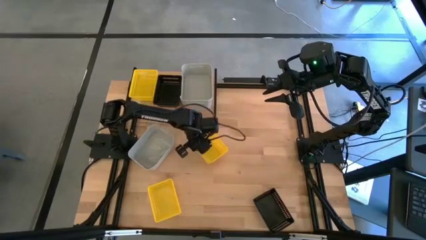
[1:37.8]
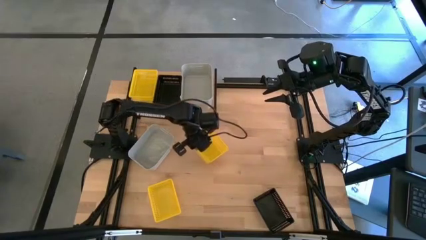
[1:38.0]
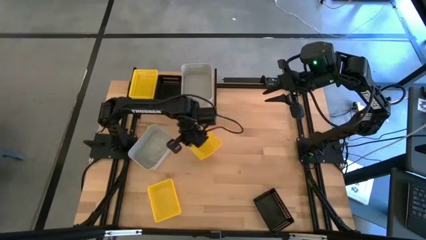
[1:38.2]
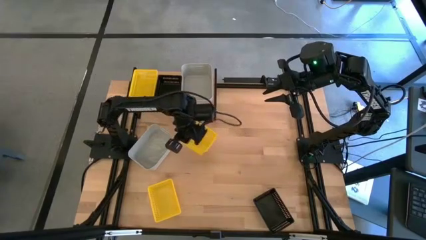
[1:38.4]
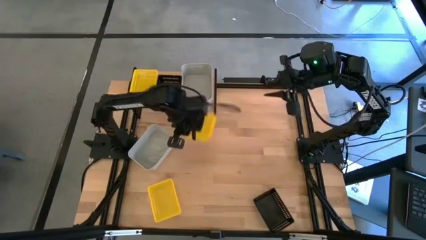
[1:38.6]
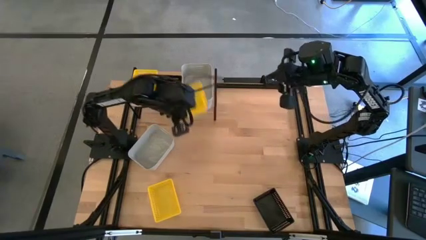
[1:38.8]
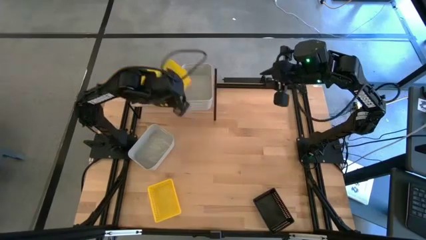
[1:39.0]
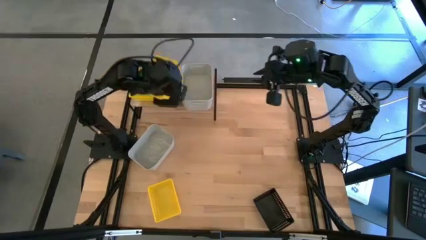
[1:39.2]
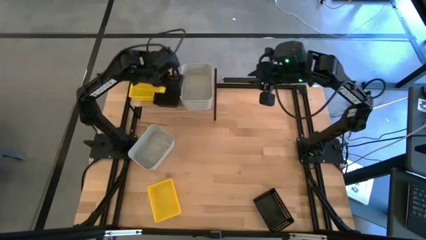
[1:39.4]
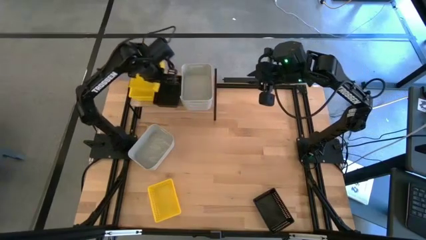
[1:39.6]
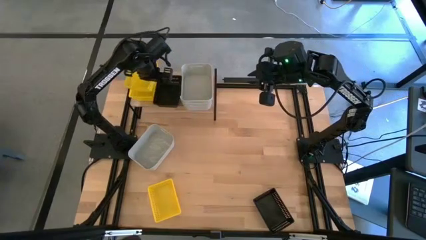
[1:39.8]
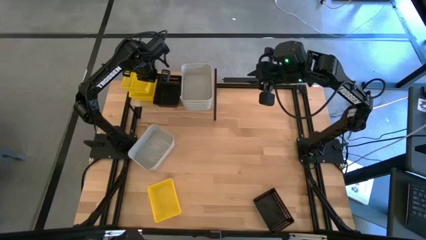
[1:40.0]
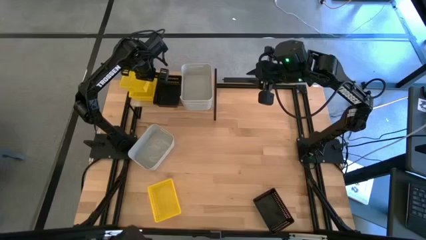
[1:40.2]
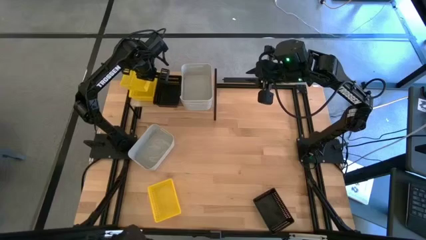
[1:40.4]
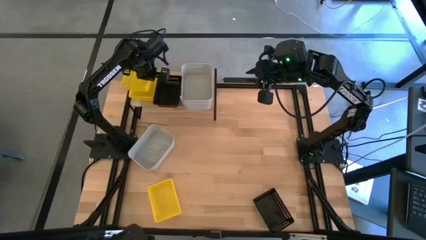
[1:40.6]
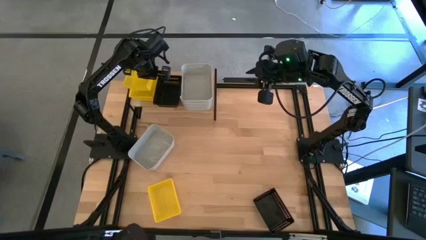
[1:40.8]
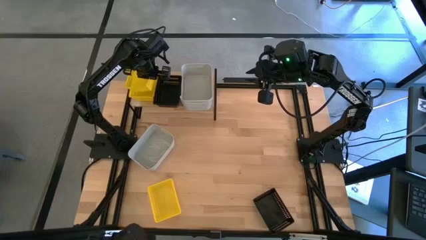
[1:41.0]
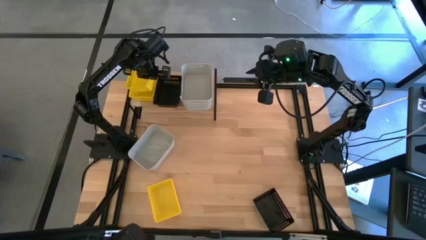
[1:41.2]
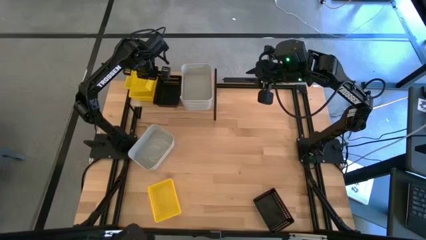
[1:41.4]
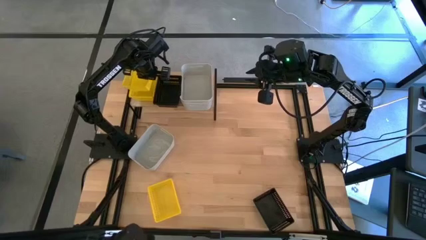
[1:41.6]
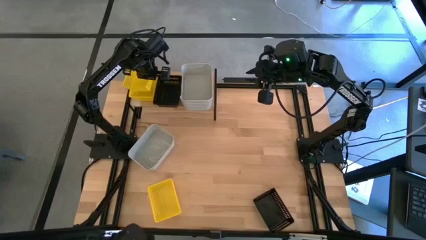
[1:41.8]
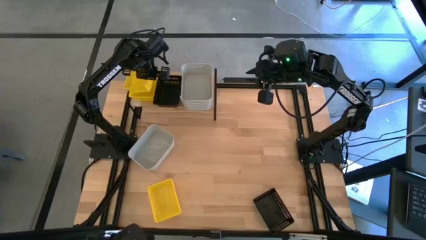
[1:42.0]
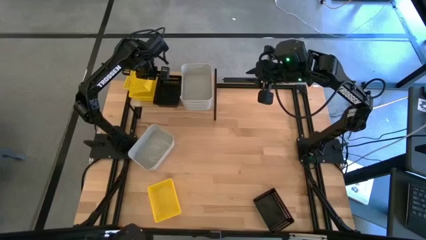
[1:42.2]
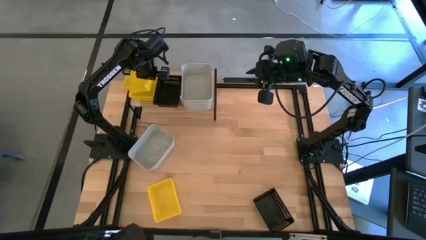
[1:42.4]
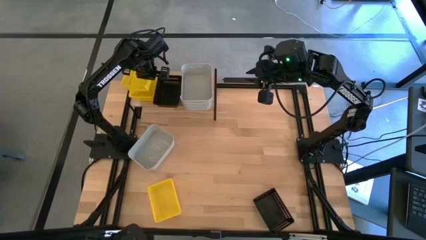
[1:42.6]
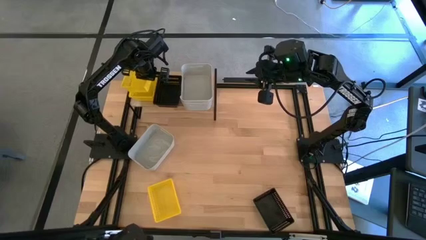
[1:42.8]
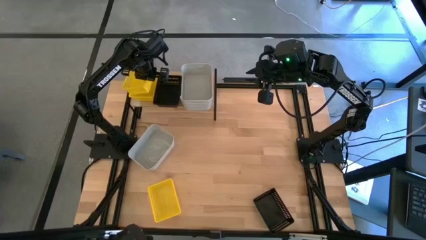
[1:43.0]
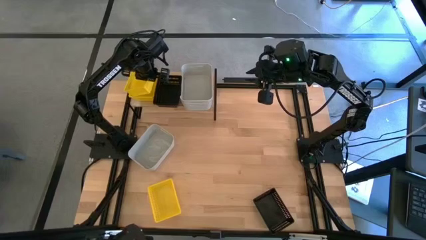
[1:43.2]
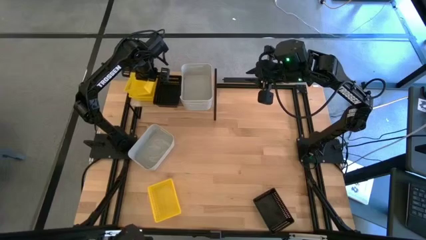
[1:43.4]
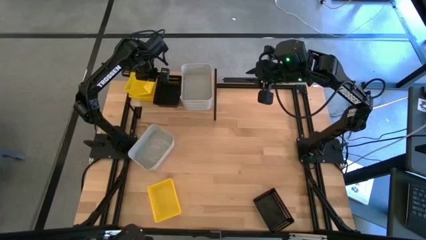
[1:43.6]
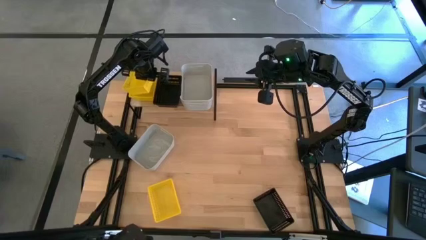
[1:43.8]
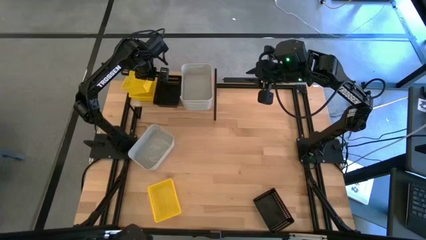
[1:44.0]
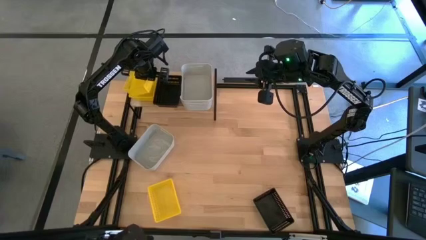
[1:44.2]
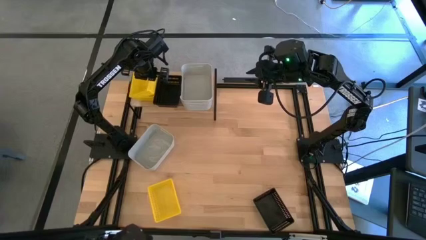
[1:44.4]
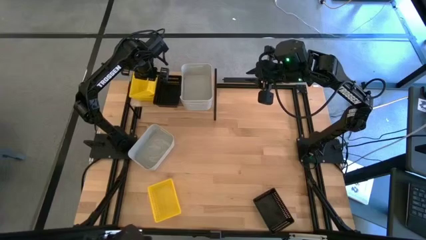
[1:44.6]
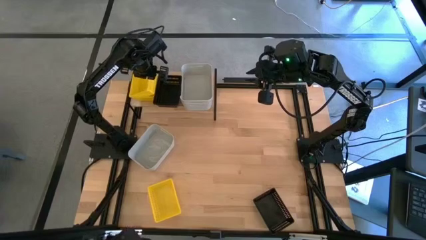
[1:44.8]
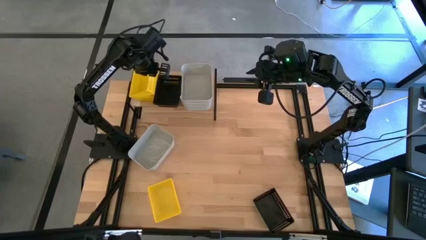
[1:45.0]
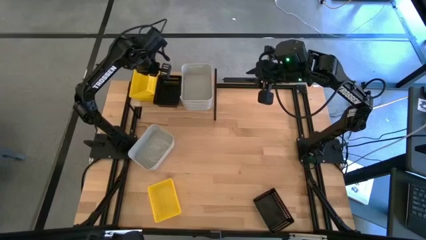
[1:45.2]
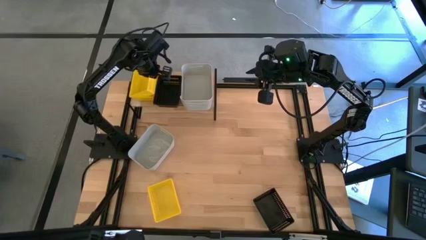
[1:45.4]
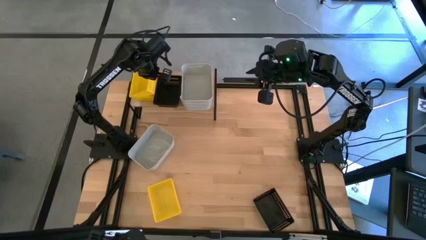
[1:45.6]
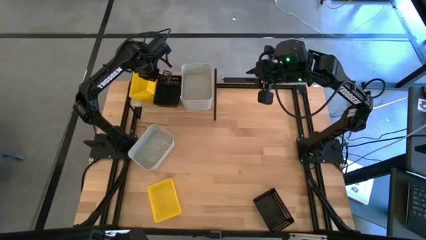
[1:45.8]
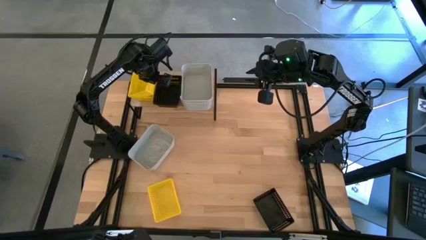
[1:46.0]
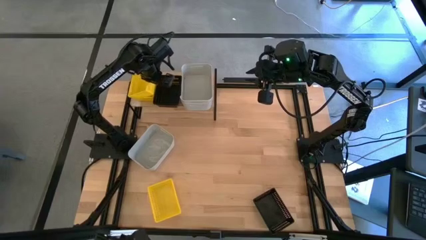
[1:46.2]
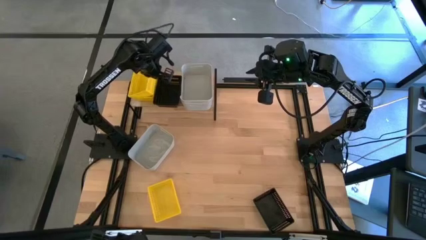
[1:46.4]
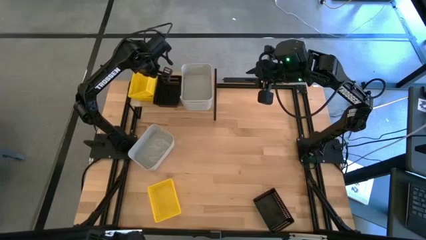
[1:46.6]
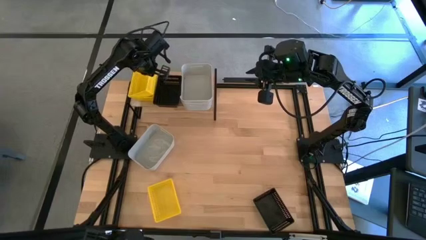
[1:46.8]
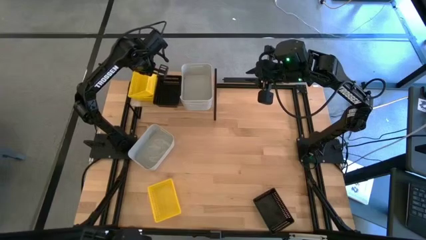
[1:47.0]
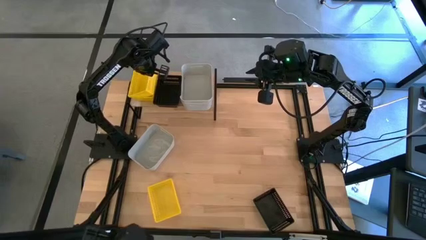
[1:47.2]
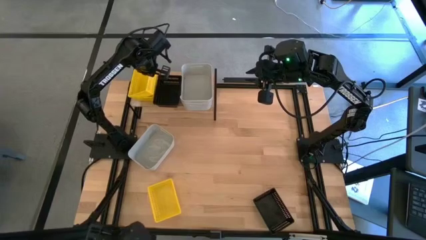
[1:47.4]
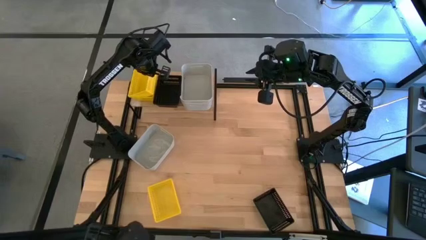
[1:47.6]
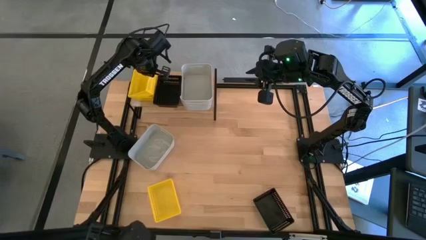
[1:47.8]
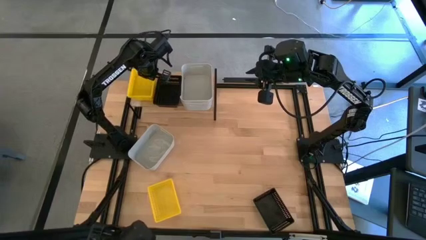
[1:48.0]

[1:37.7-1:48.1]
Task: Stack baskets on shelf by color
Stack the top yellow bin on top of the other yellow bin on the shelf
